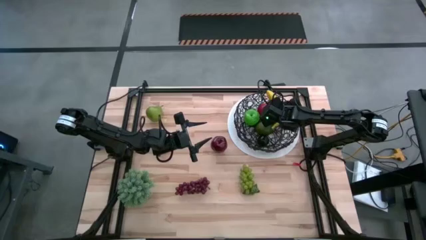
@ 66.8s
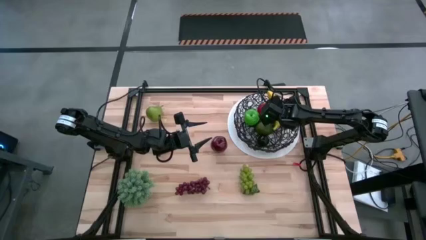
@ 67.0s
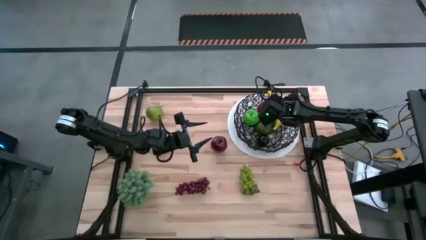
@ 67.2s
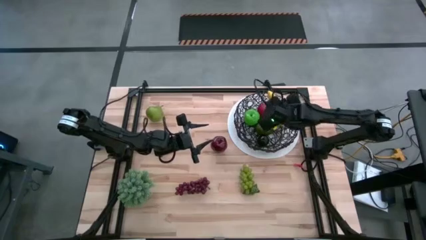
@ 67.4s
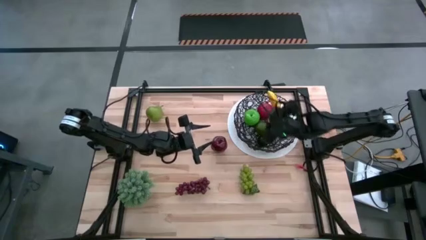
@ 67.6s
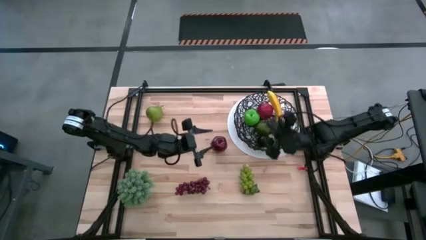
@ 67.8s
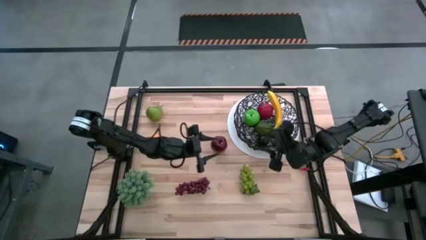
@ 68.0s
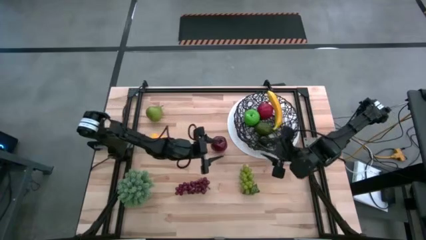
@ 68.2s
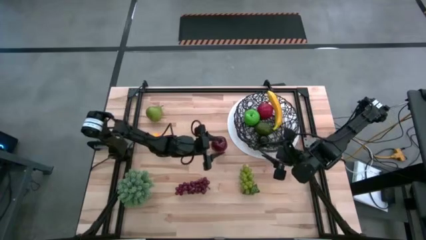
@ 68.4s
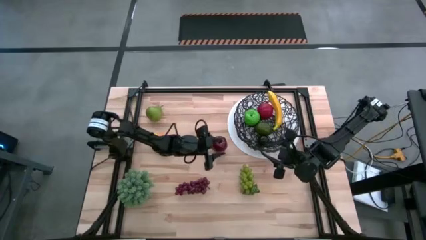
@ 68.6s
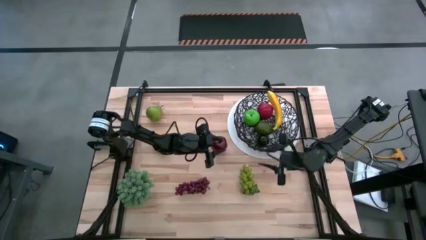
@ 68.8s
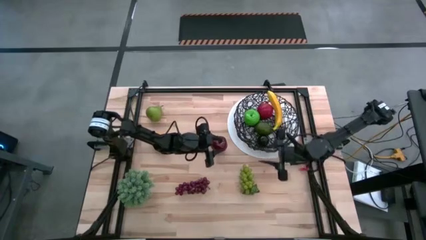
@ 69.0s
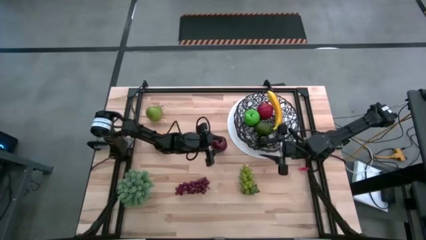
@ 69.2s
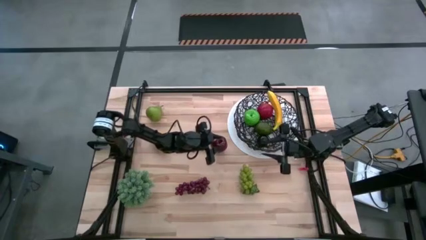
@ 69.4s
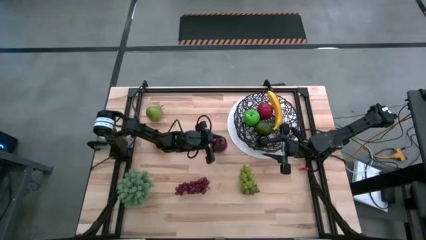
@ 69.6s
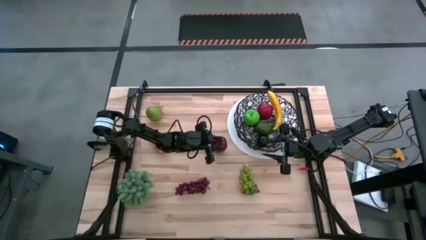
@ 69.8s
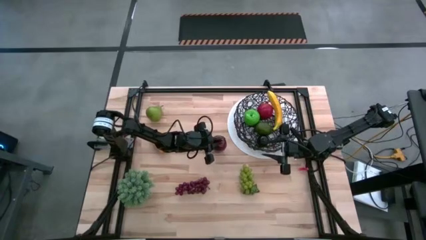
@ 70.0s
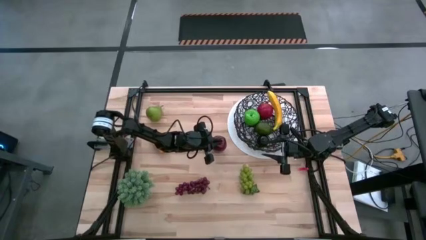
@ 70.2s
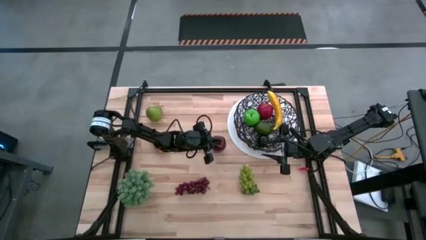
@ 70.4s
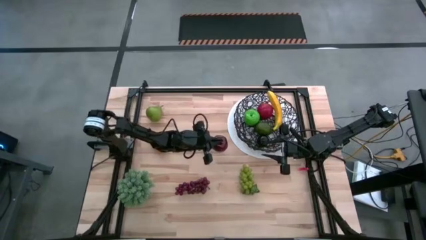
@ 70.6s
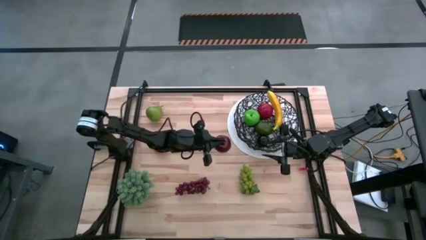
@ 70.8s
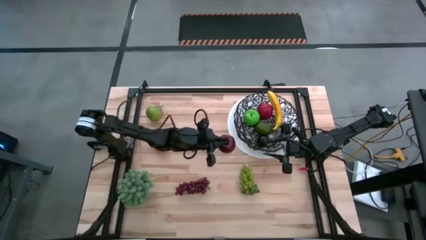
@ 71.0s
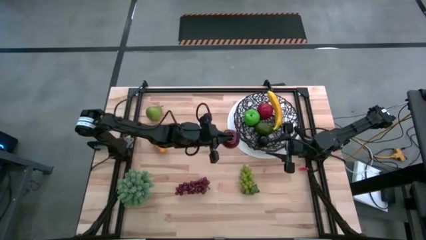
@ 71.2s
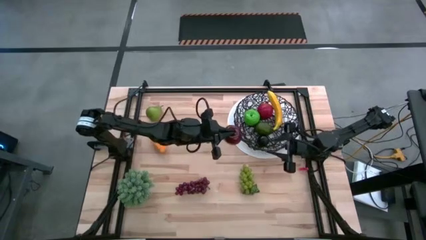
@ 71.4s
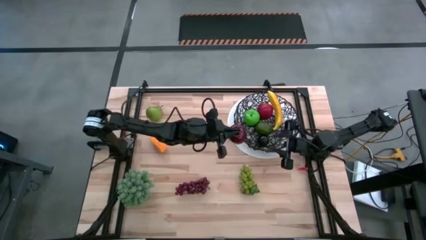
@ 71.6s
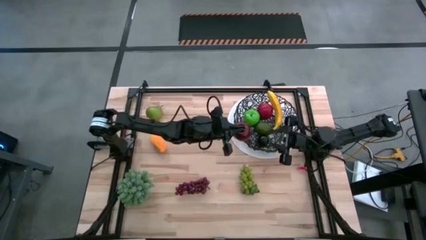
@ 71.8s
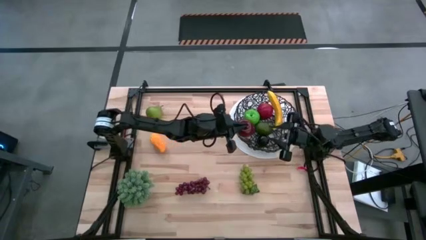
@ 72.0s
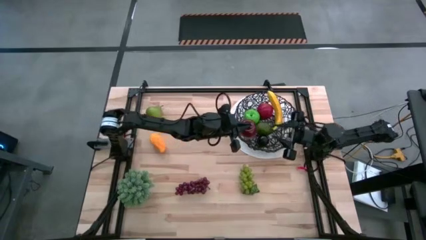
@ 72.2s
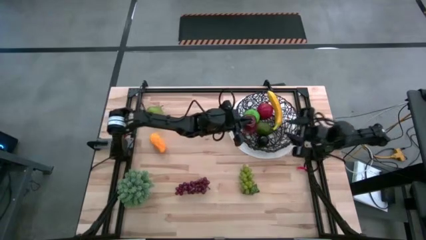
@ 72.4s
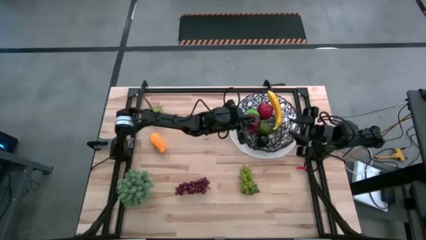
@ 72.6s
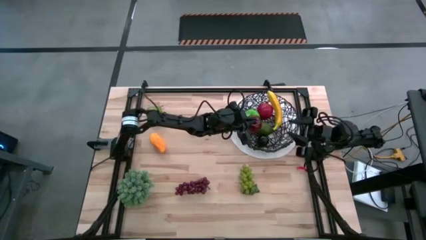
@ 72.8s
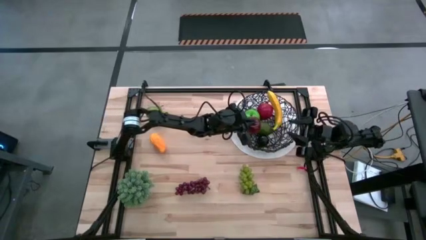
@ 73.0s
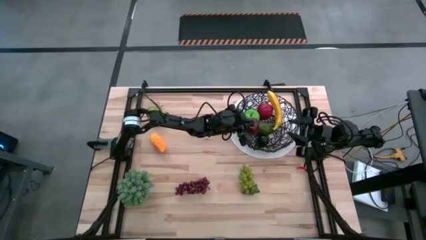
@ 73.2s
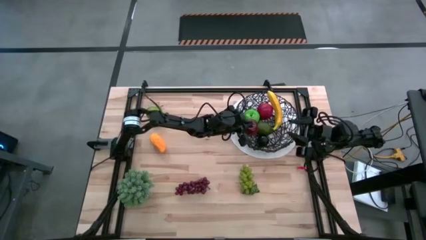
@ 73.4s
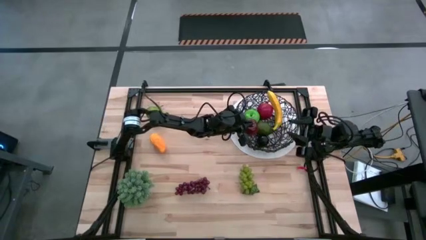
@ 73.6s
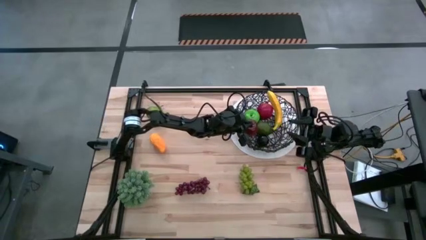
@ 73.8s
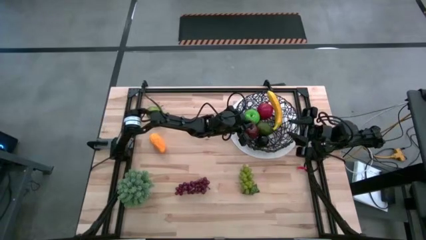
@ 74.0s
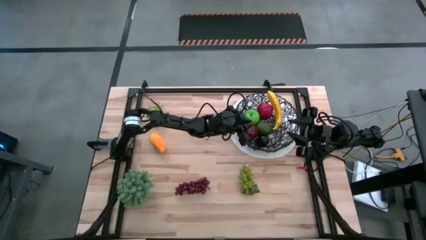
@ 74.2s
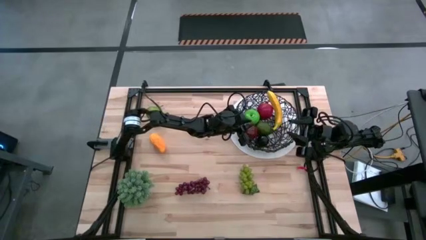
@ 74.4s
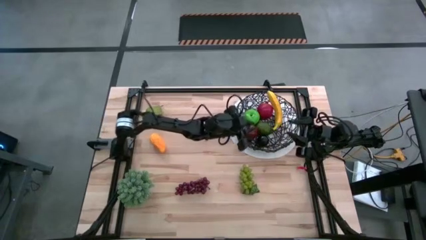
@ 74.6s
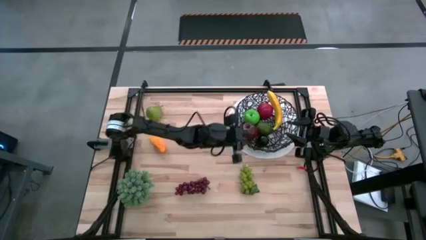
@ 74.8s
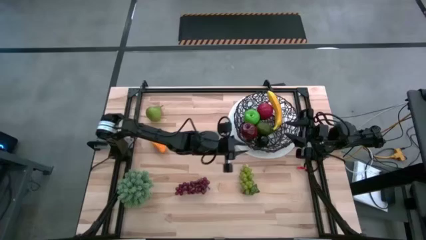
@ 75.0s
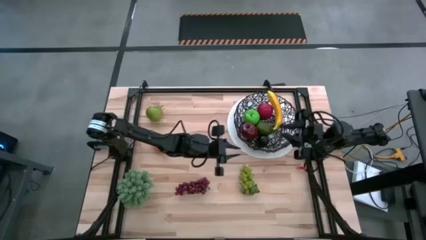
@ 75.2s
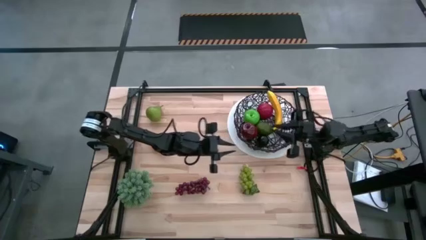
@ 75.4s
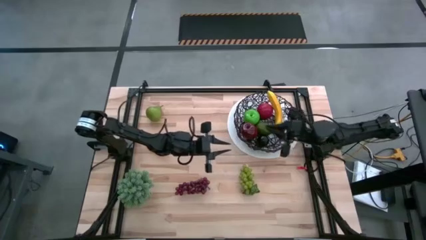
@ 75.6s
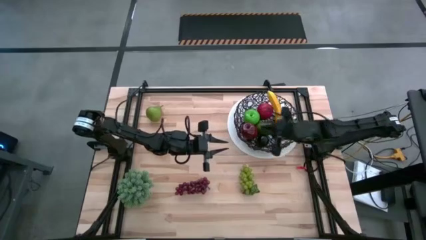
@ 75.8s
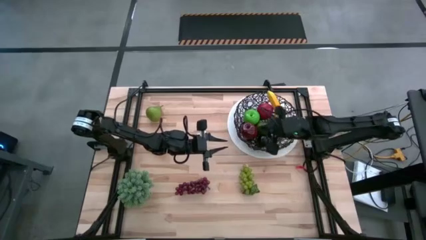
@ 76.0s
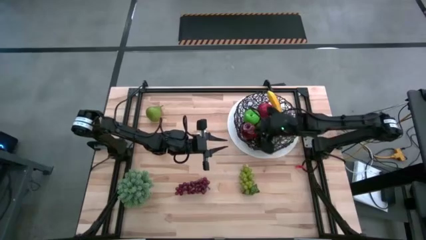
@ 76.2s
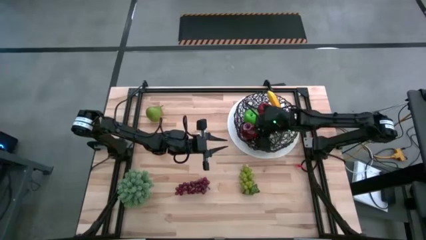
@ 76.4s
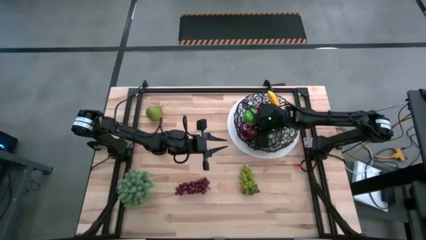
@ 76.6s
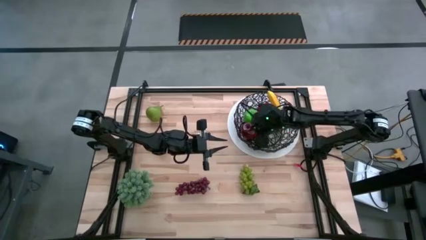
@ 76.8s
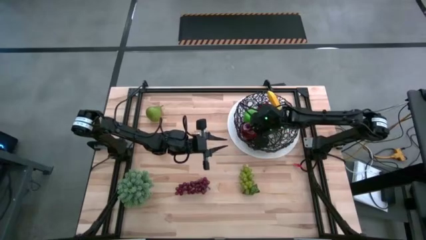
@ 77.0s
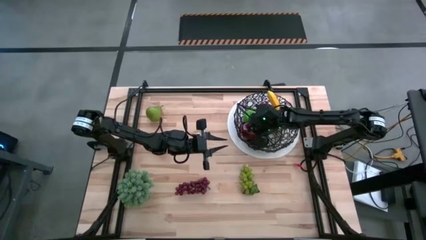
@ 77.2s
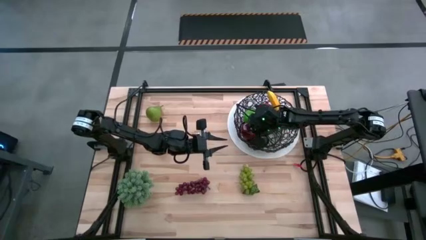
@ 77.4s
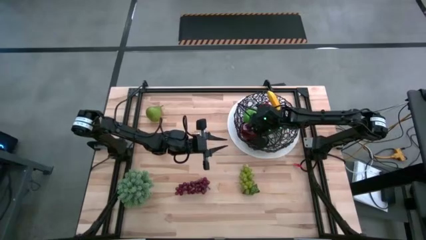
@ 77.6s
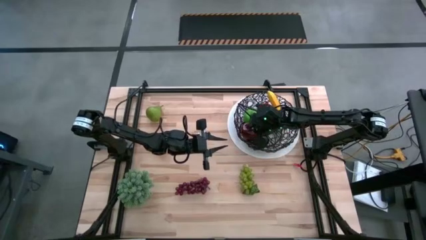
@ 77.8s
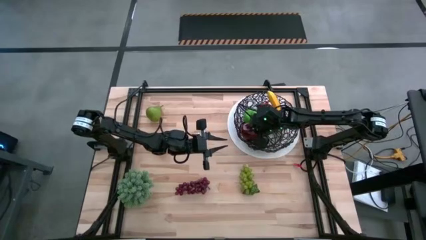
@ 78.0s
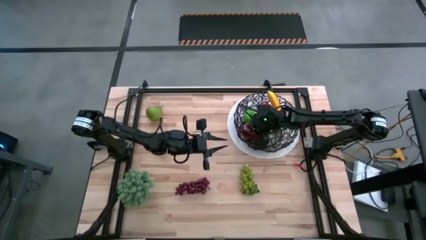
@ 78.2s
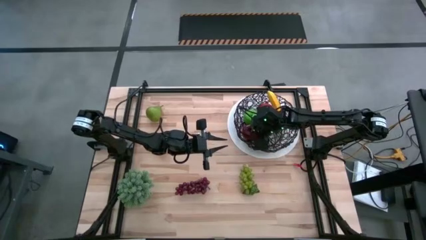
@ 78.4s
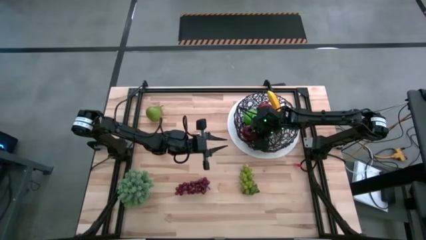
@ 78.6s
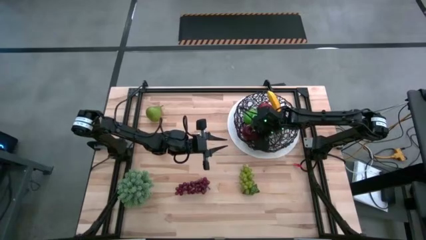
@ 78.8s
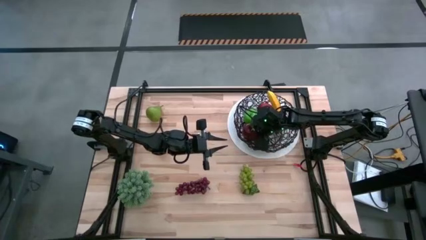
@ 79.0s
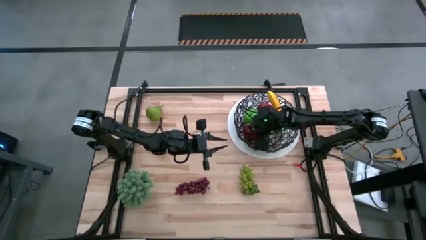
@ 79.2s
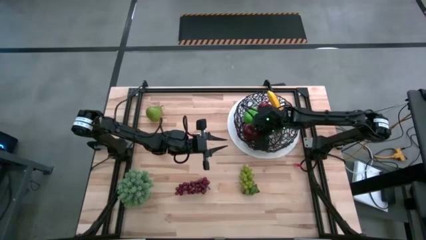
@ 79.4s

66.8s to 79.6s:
Task: Build produce basket
Put the red apple into the wire basket

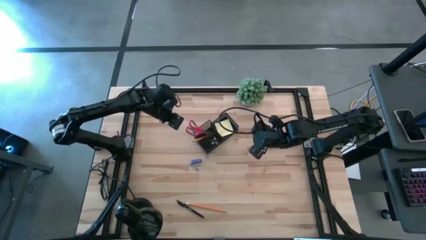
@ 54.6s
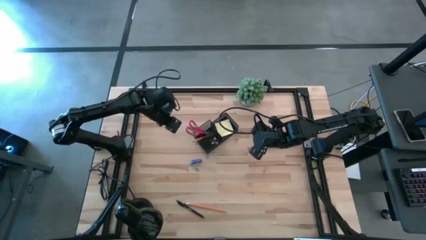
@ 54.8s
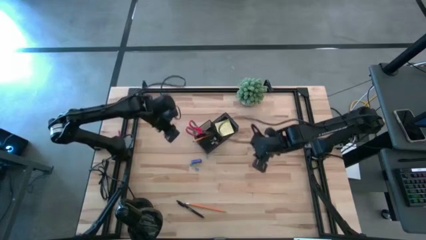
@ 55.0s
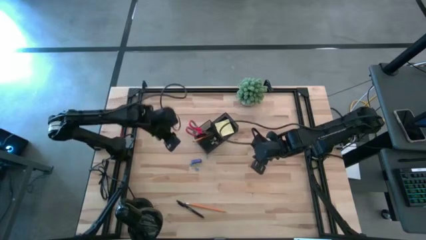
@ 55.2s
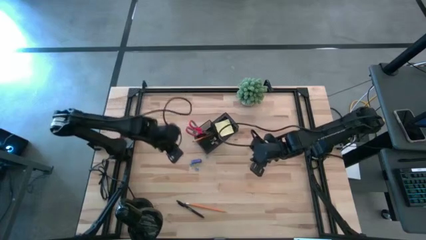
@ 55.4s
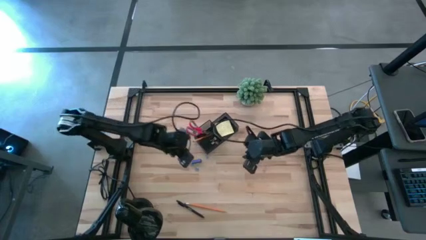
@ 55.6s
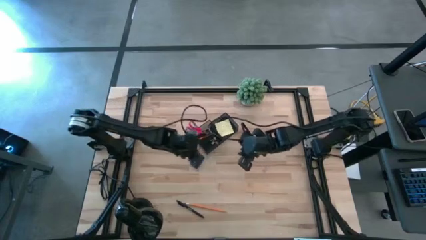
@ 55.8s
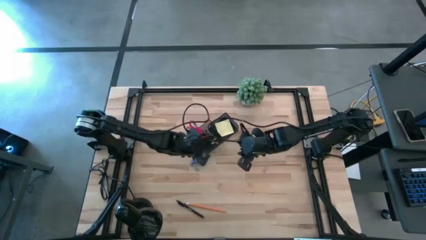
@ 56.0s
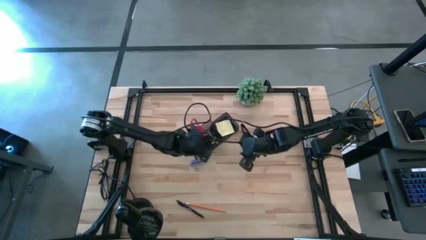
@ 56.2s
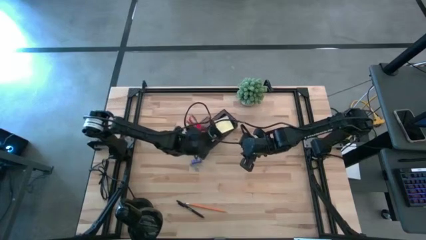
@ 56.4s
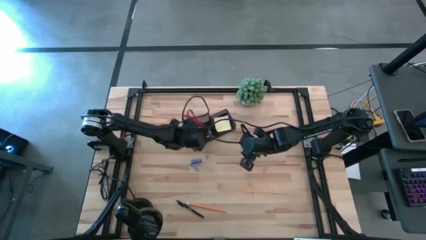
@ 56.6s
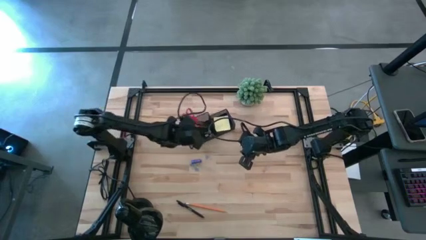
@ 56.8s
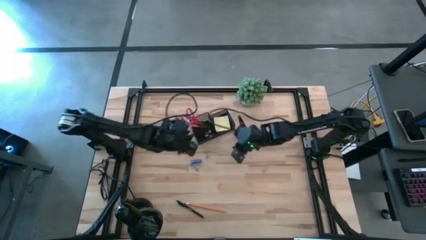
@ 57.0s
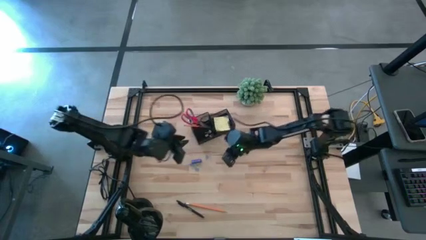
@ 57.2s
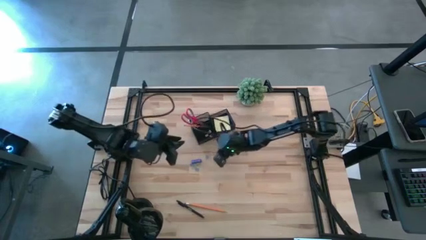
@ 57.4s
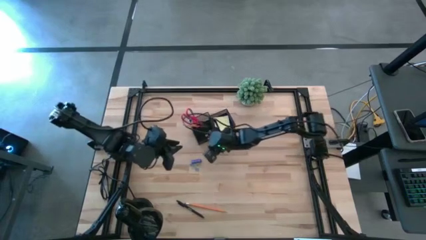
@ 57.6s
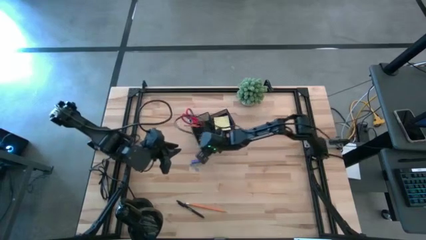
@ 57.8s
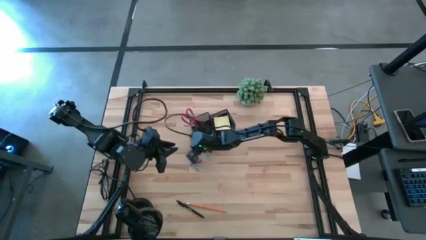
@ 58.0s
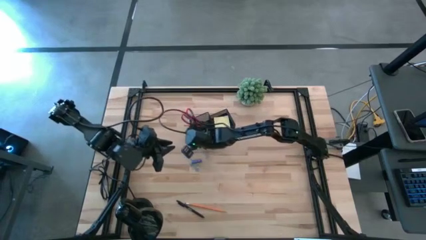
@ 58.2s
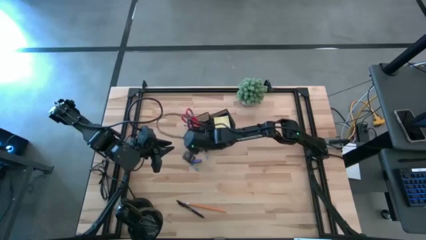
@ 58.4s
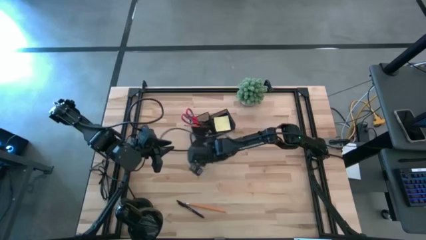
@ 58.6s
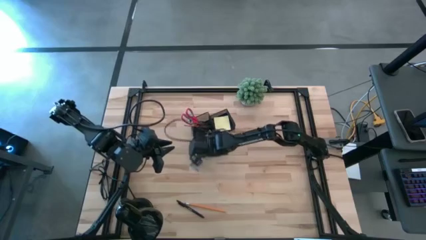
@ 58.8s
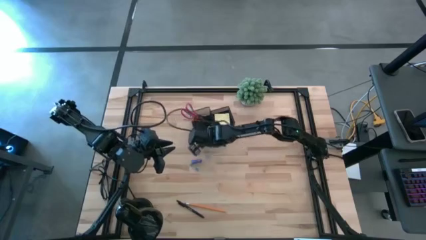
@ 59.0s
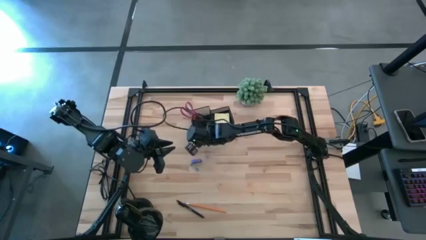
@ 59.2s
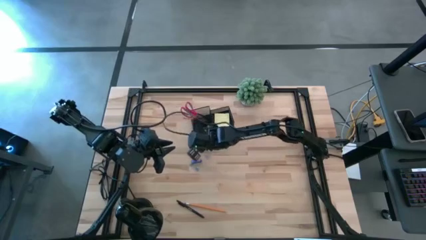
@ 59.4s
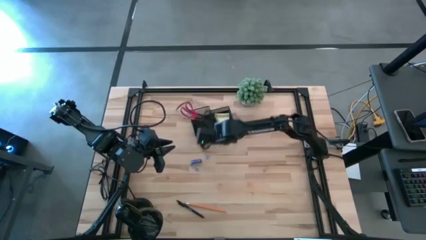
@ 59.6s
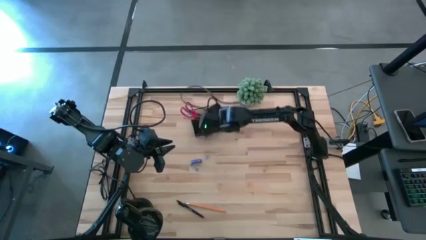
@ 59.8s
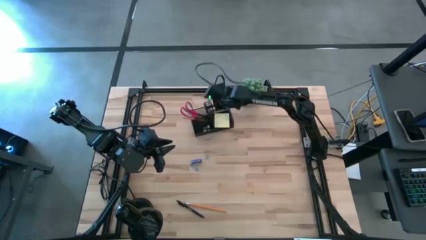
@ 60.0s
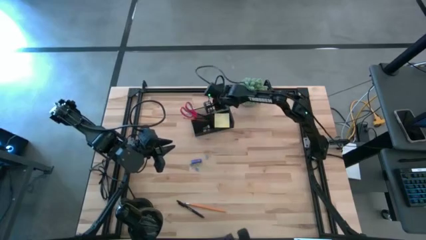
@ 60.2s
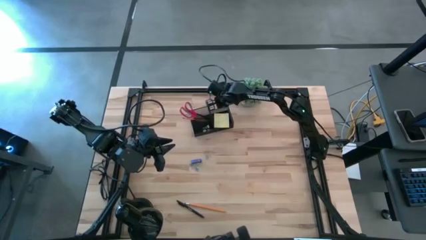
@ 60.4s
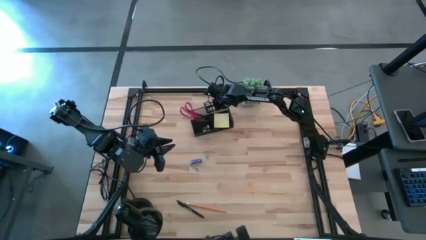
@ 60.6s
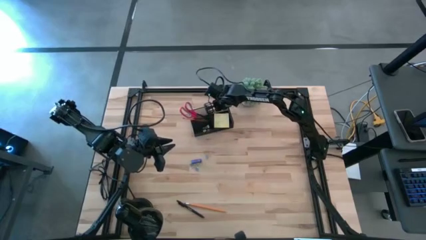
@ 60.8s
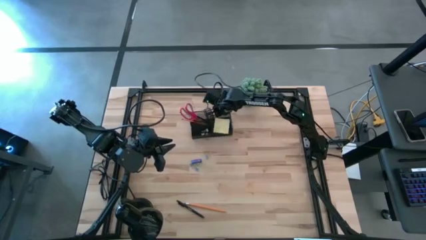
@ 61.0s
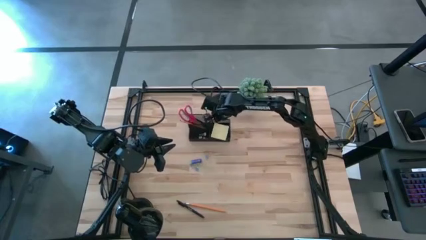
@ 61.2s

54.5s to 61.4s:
Task: Pick and place office supplies into organizer
Adjust the desk organizer
